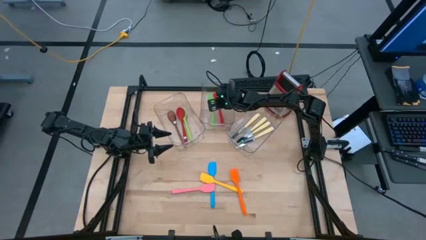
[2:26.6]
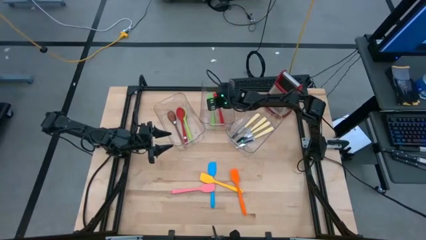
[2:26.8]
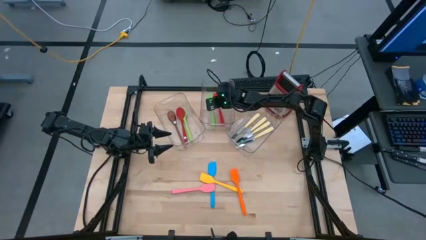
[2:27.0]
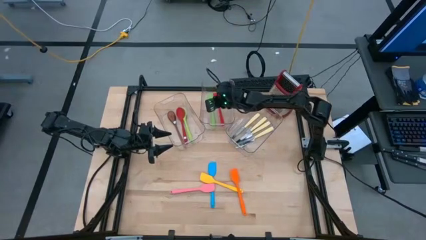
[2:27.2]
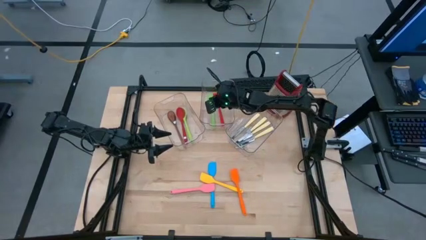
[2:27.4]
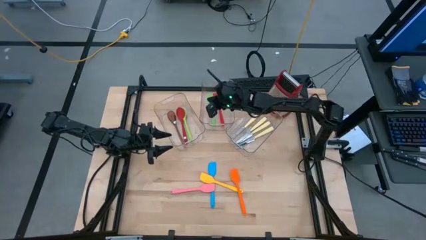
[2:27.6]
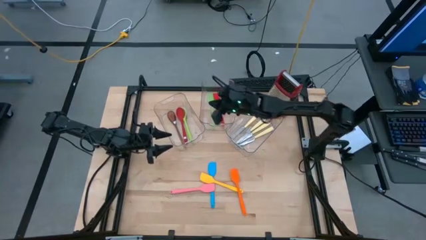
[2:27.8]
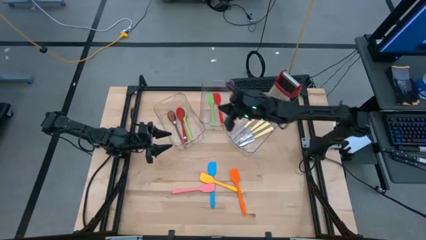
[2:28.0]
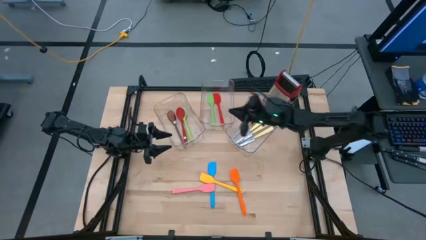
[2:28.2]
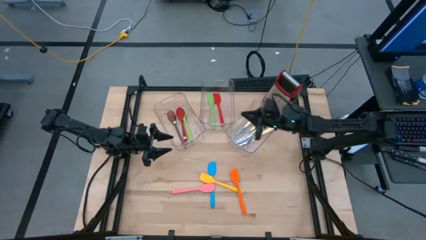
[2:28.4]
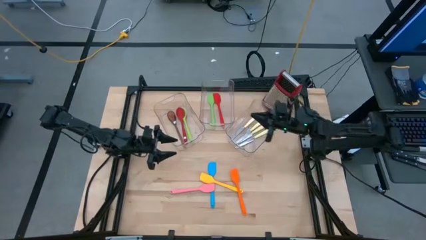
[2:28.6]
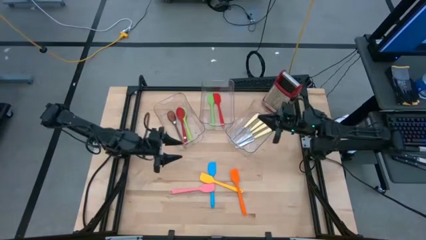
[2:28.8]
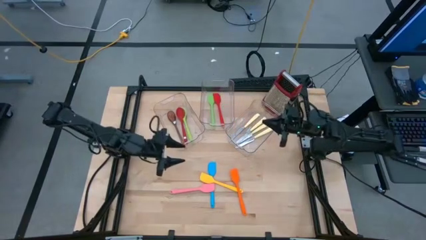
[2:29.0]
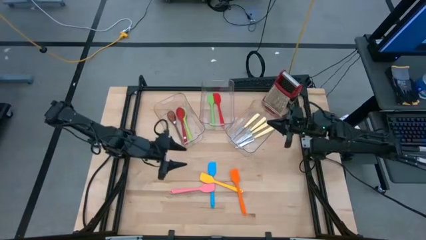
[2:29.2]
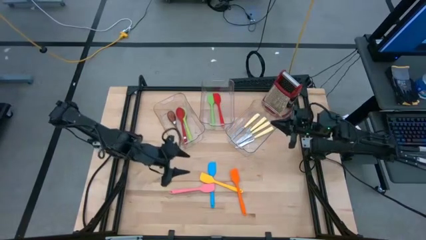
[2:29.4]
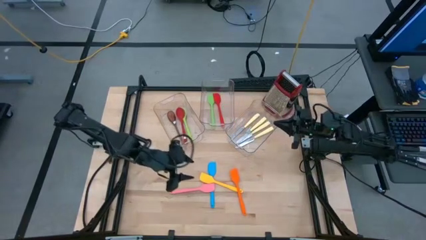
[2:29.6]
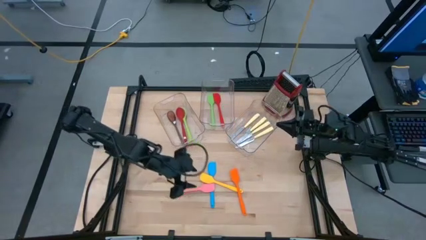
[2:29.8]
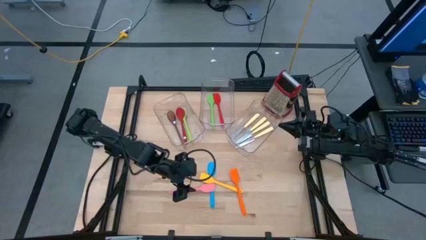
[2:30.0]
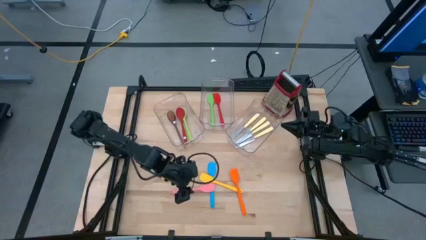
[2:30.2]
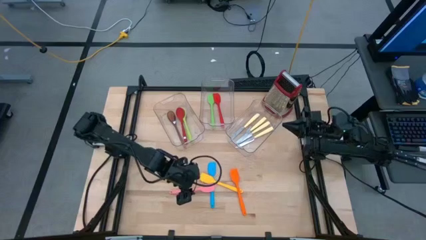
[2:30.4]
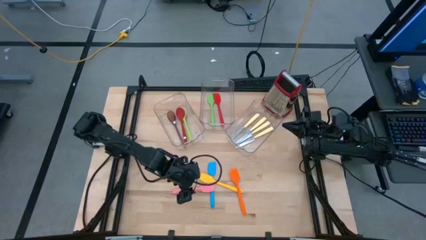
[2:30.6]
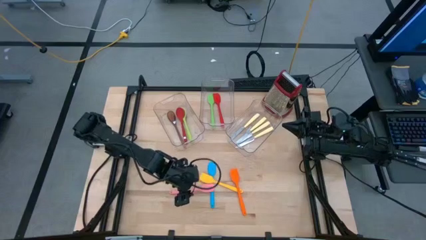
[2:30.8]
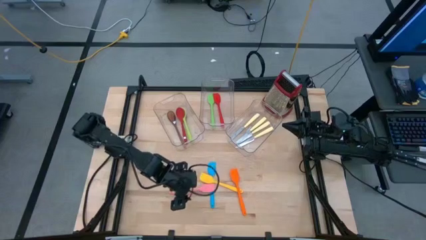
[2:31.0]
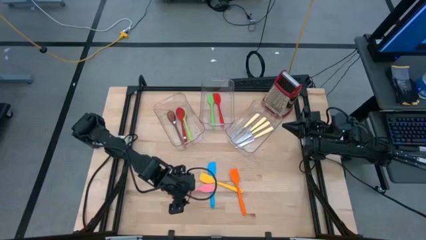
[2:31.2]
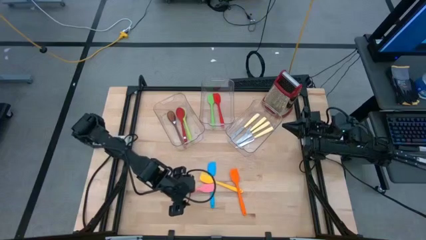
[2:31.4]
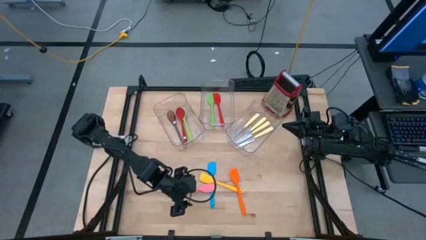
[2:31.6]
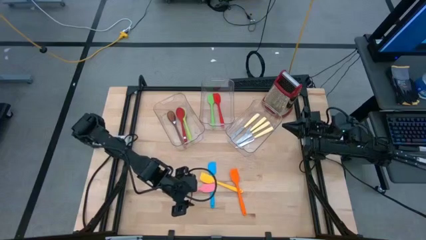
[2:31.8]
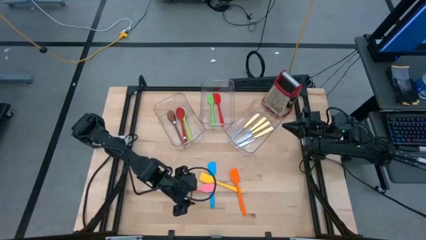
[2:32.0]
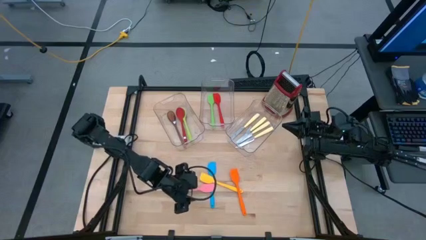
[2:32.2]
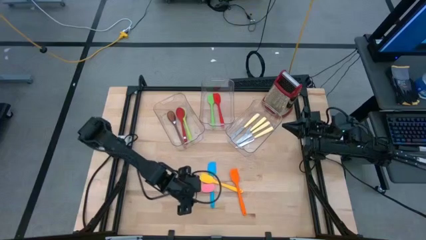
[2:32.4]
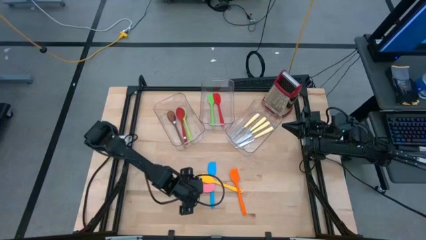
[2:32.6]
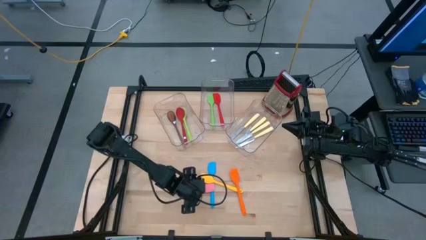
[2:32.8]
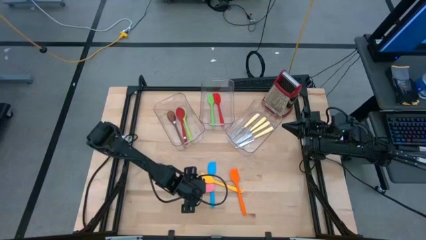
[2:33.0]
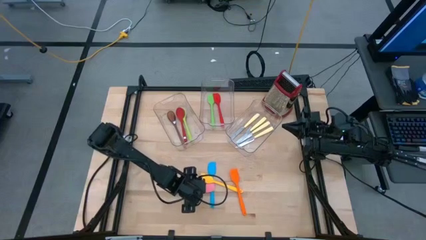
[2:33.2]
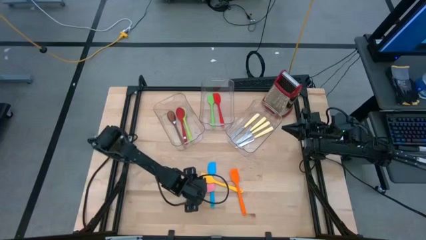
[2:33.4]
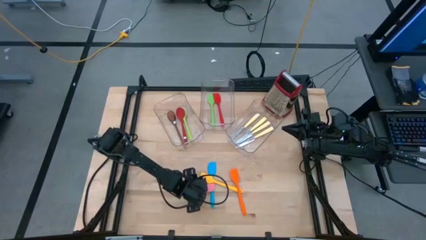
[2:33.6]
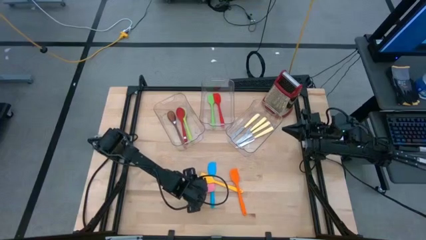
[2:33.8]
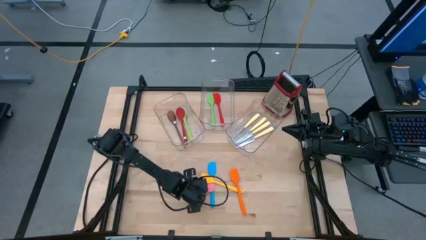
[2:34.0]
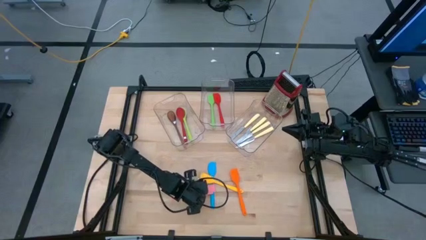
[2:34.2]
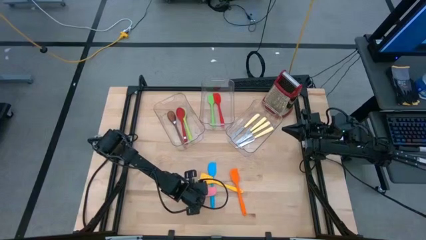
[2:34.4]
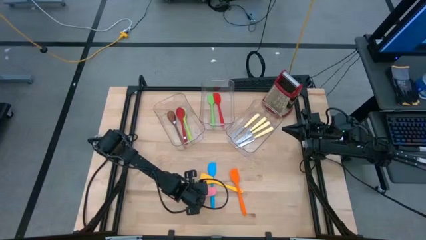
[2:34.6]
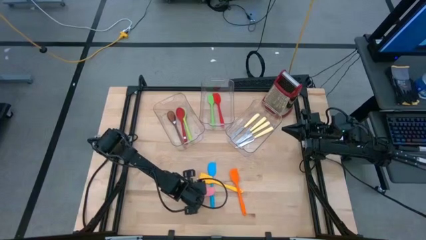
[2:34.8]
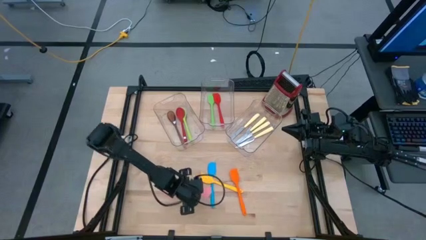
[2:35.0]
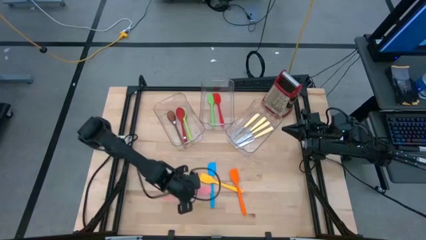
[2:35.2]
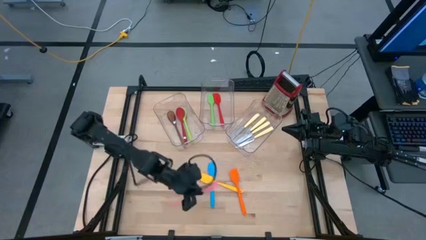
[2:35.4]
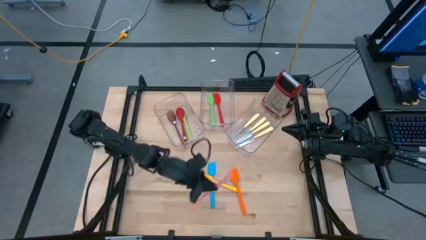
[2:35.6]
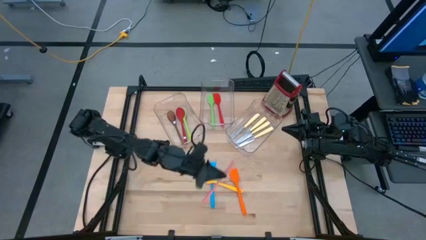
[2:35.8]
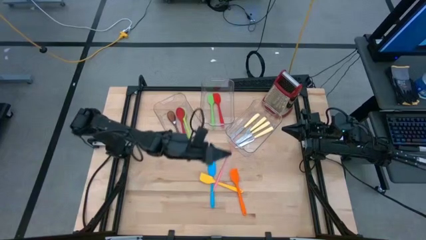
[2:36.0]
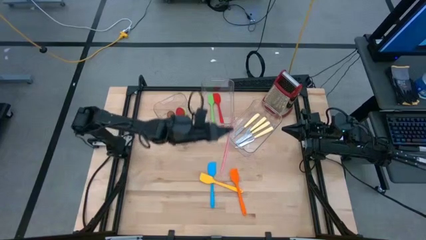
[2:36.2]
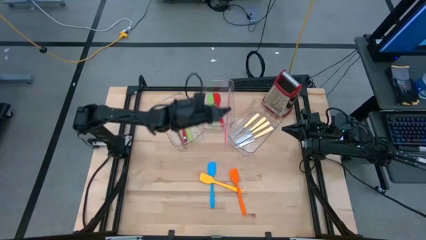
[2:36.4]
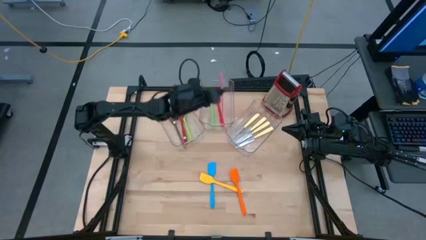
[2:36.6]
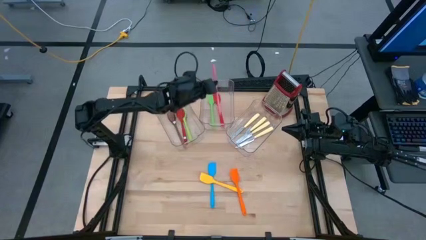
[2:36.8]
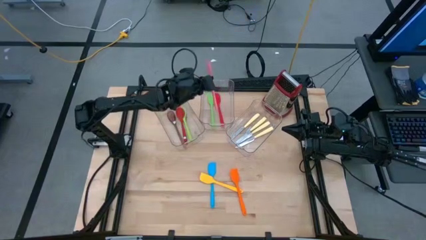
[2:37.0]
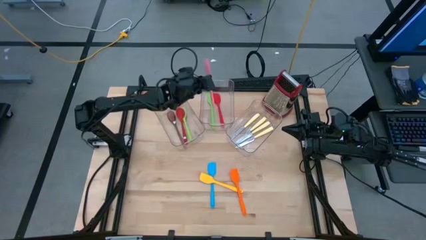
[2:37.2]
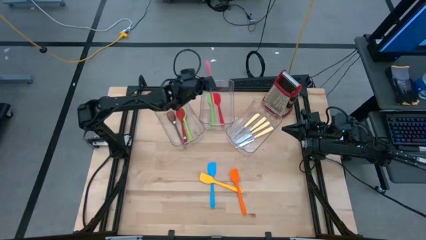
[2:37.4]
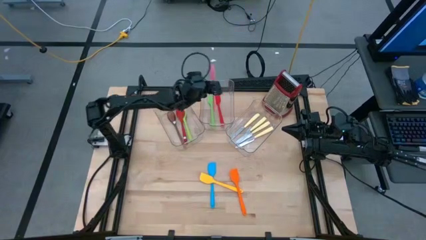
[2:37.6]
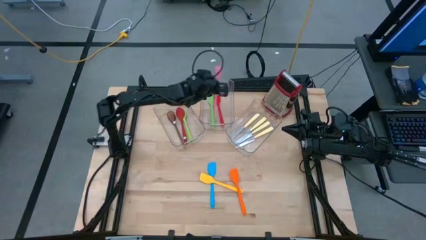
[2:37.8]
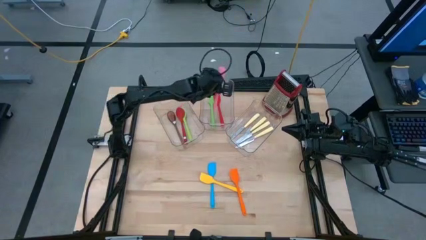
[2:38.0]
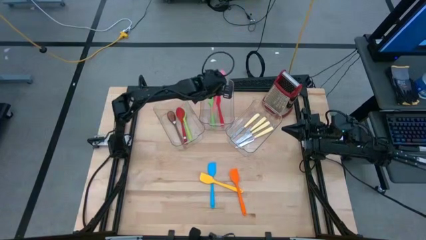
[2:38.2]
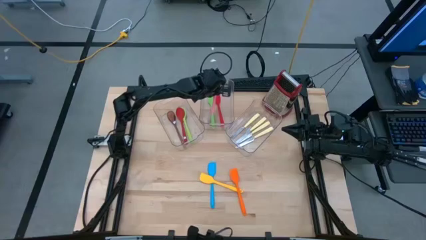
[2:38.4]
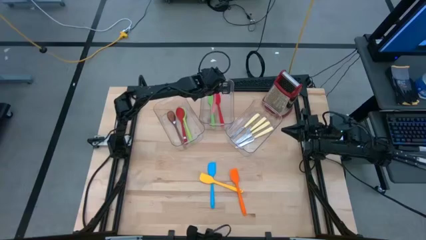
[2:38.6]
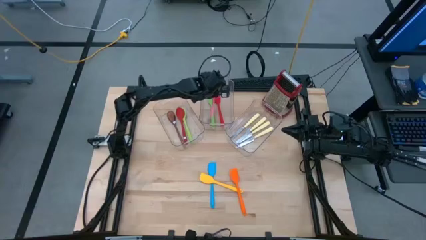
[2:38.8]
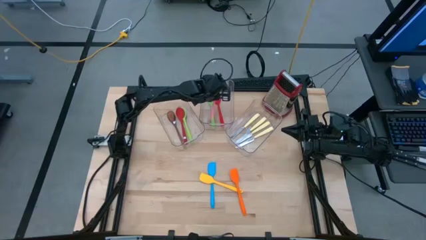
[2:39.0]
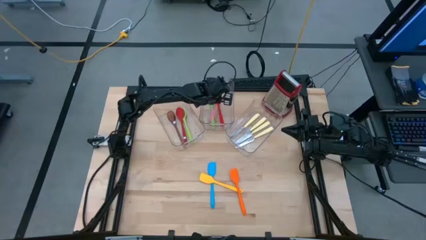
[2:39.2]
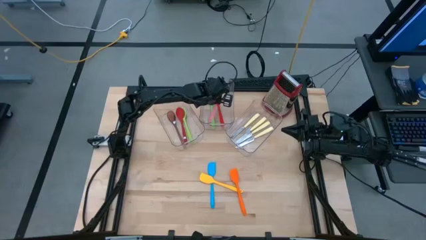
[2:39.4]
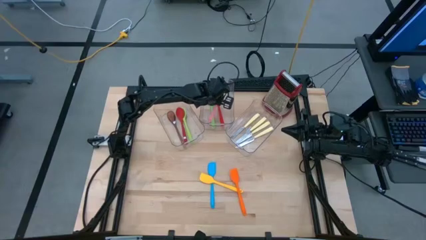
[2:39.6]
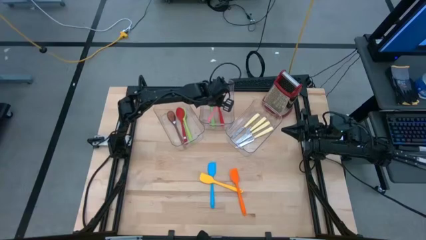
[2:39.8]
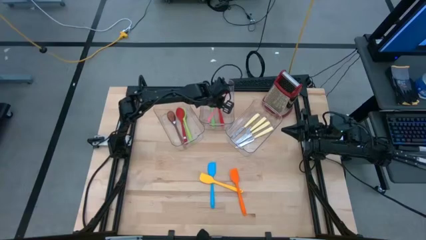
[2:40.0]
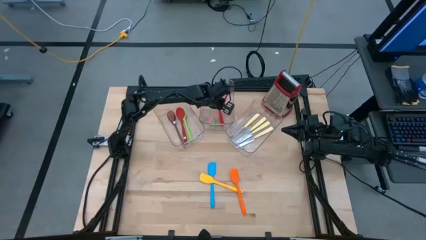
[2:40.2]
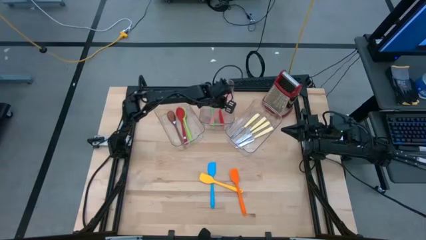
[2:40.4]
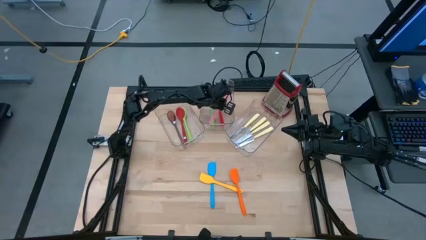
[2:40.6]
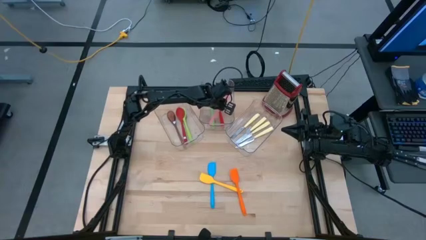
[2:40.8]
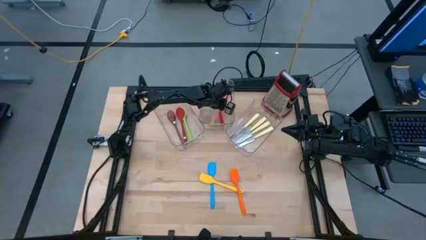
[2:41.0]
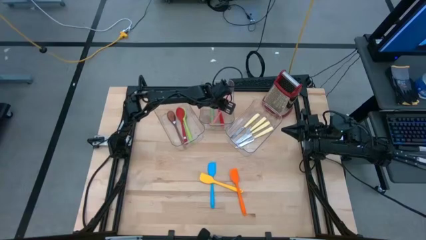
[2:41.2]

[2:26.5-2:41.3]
Task: Pick & Place Kitchen Items
Put the pink spatula into the middle transparent bin

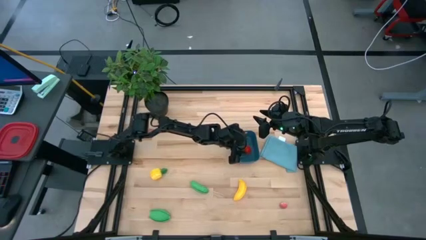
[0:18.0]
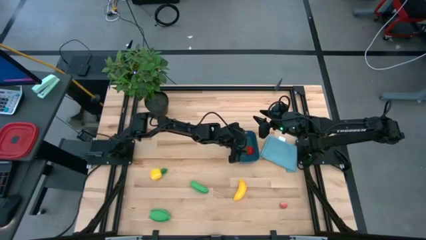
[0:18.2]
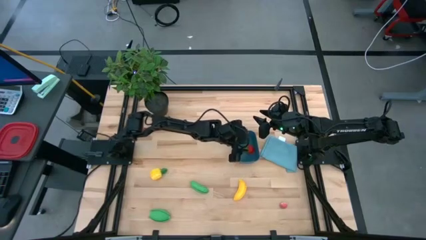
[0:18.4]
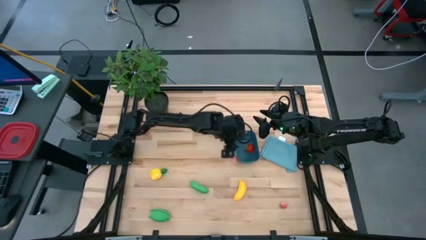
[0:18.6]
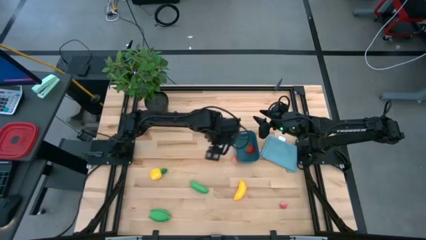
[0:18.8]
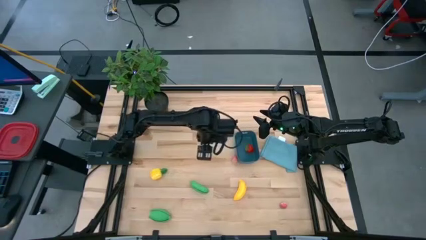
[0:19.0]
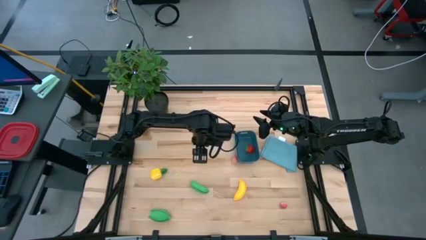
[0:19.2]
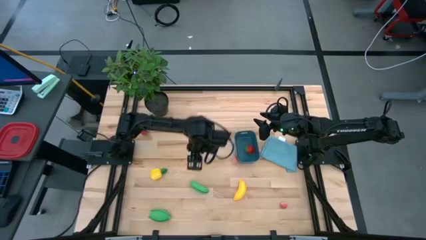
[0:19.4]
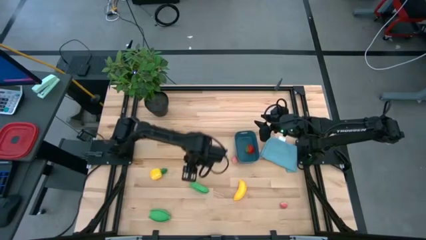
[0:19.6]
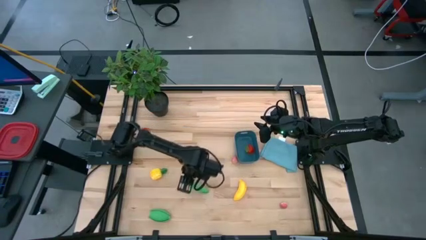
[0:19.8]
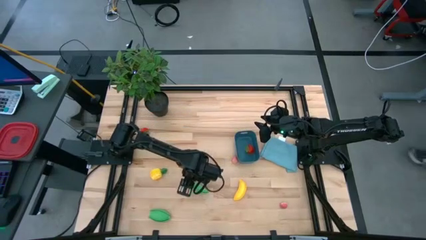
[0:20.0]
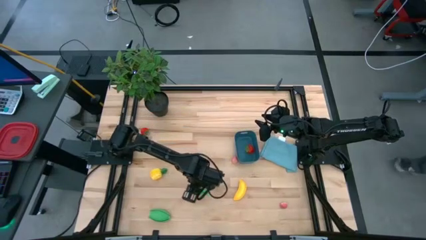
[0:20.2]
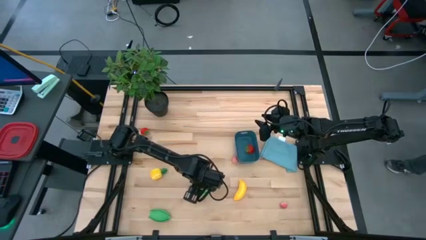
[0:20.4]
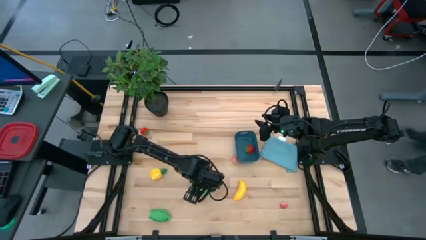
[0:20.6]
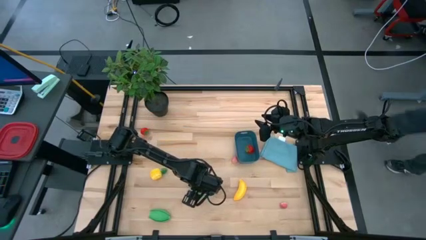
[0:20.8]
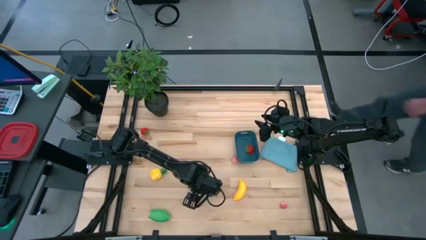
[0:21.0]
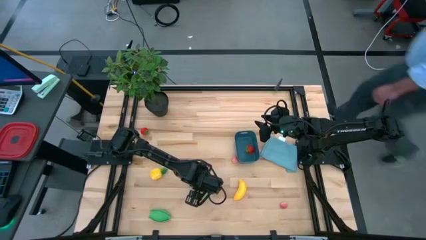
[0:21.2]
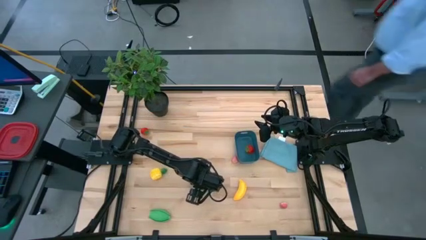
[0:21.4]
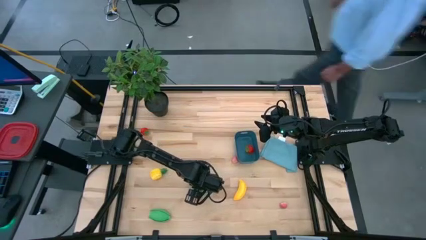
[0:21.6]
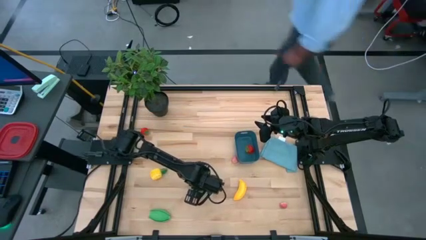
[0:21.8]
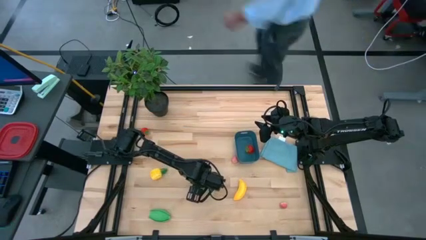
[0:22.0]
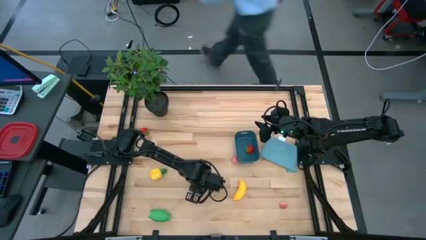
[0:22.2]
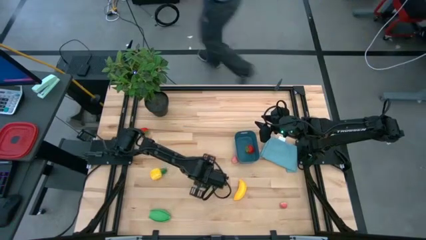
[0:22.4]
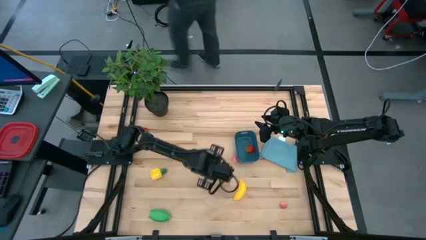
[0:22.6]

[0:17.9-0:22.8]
Task: Pick and placing Produce into tupperware
Put the green peas into the blue bin
